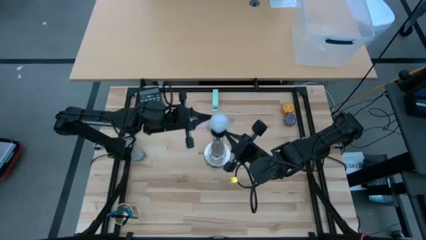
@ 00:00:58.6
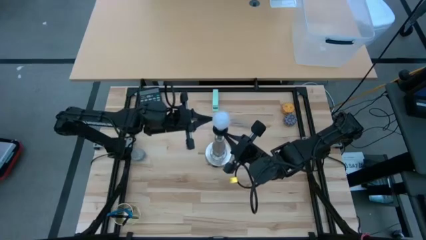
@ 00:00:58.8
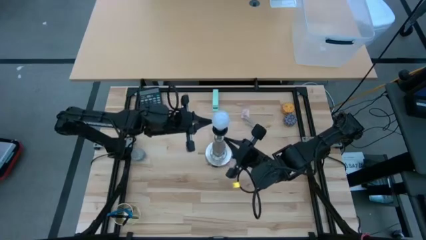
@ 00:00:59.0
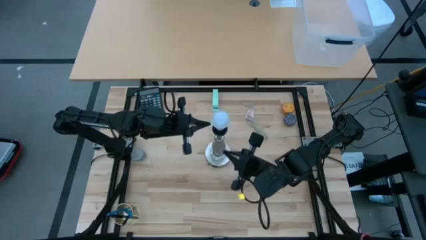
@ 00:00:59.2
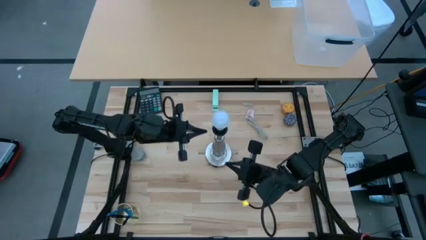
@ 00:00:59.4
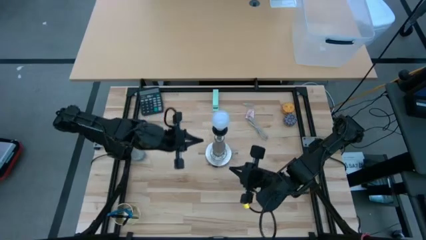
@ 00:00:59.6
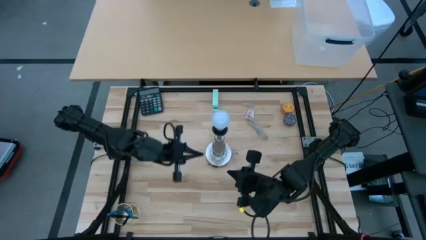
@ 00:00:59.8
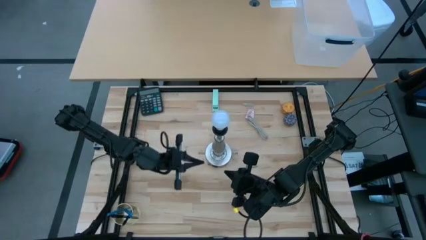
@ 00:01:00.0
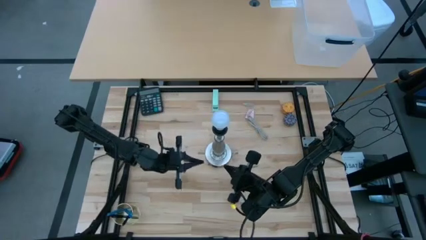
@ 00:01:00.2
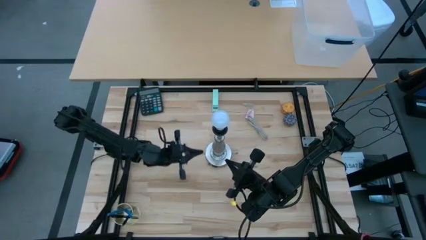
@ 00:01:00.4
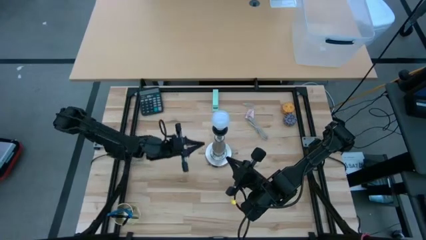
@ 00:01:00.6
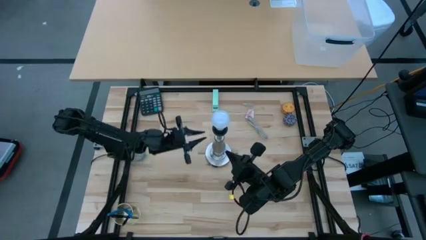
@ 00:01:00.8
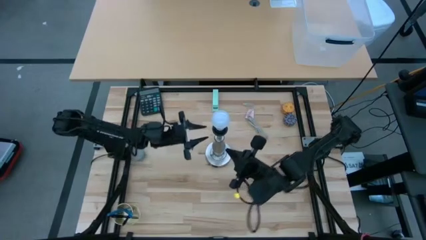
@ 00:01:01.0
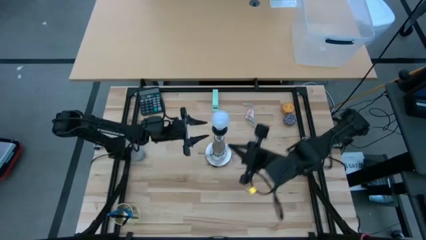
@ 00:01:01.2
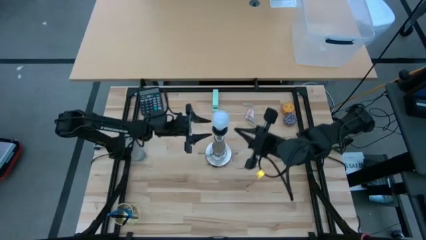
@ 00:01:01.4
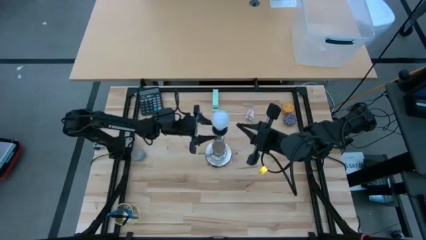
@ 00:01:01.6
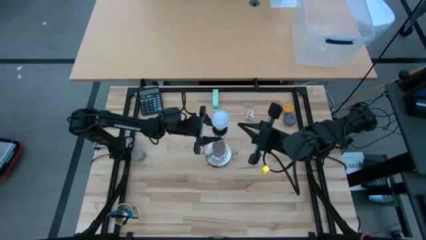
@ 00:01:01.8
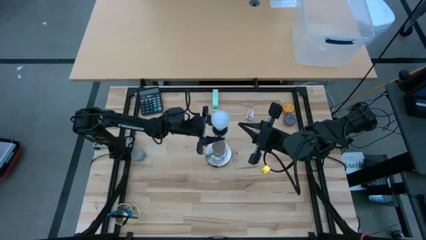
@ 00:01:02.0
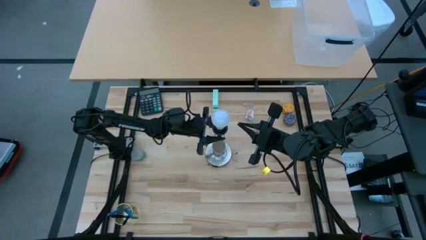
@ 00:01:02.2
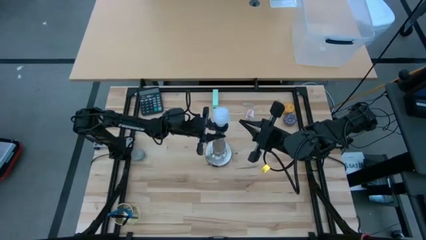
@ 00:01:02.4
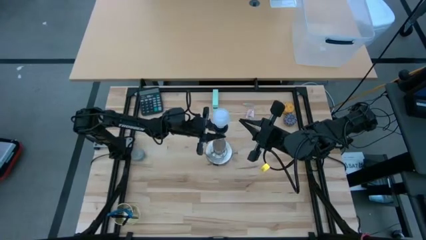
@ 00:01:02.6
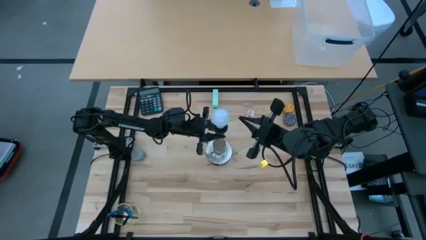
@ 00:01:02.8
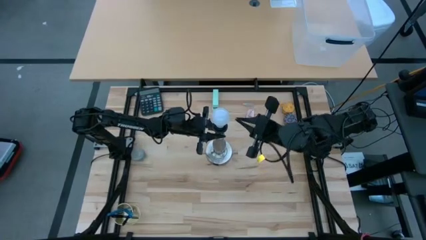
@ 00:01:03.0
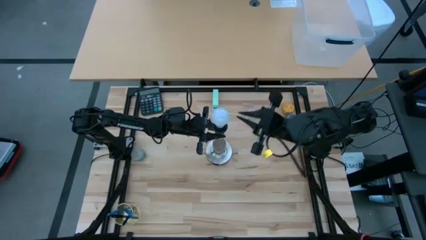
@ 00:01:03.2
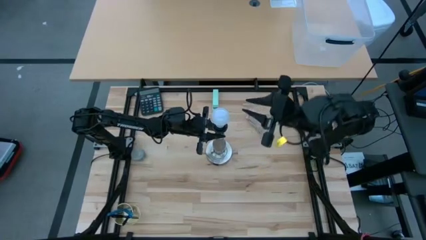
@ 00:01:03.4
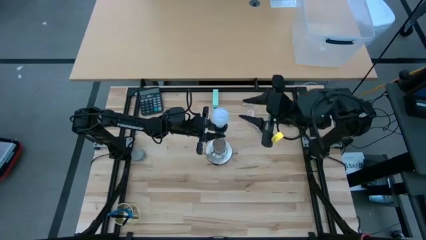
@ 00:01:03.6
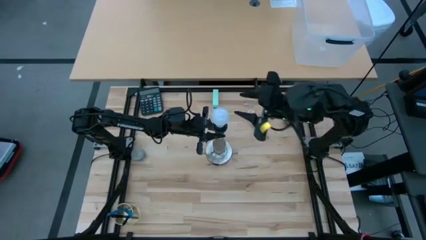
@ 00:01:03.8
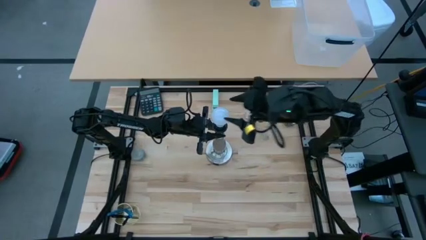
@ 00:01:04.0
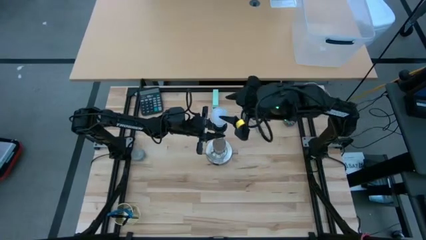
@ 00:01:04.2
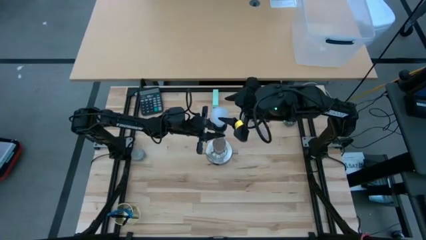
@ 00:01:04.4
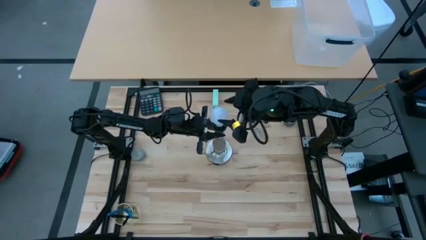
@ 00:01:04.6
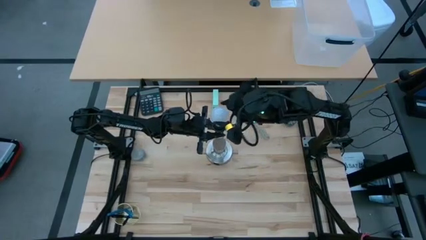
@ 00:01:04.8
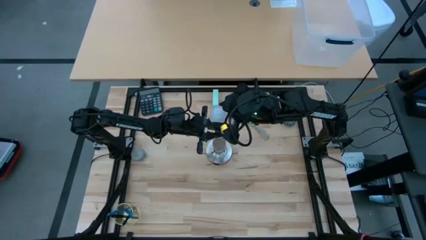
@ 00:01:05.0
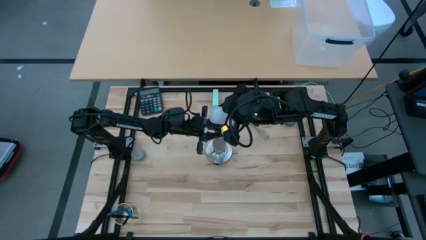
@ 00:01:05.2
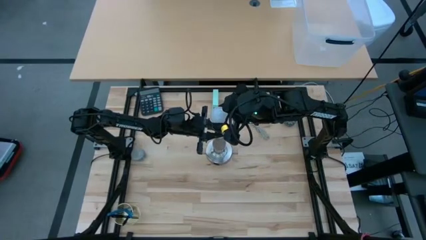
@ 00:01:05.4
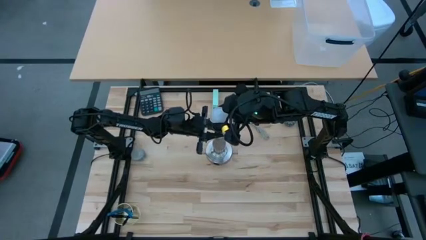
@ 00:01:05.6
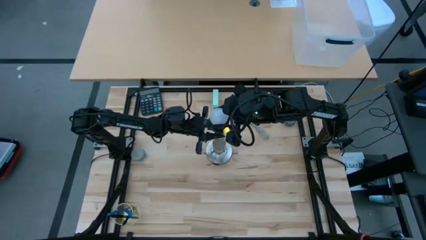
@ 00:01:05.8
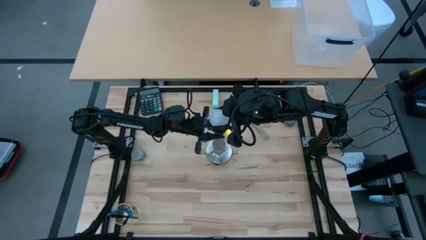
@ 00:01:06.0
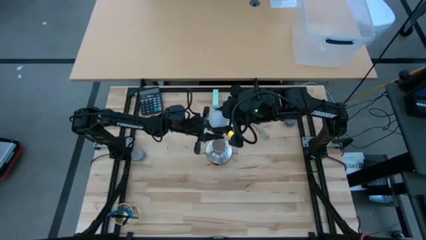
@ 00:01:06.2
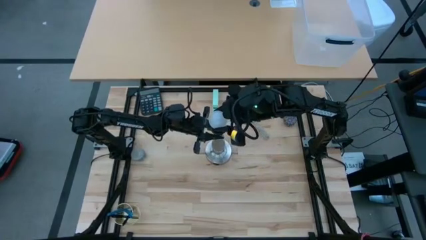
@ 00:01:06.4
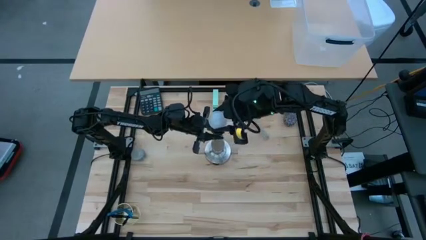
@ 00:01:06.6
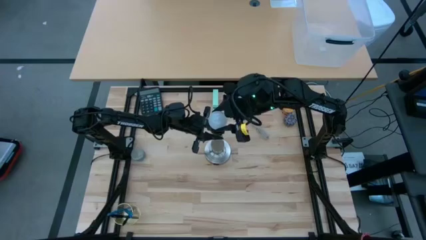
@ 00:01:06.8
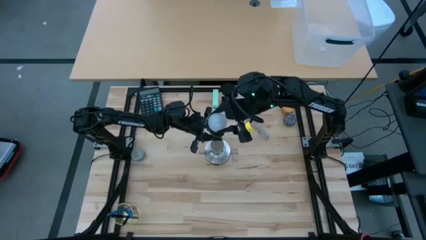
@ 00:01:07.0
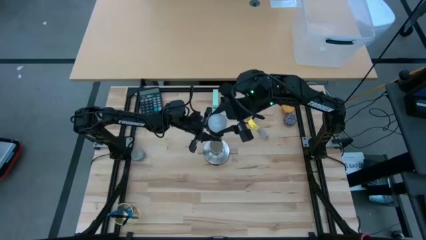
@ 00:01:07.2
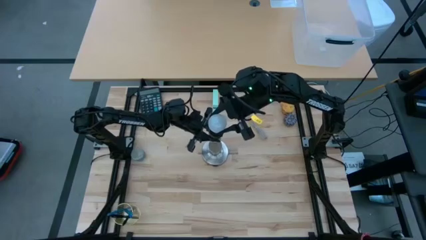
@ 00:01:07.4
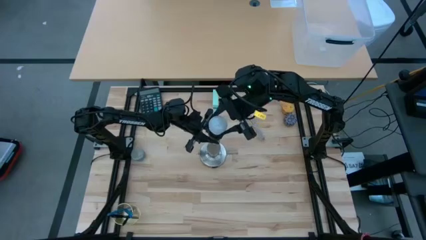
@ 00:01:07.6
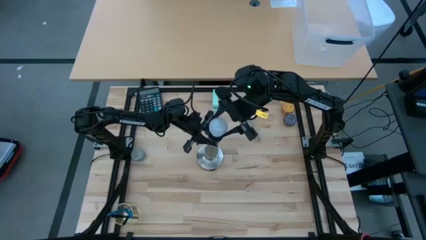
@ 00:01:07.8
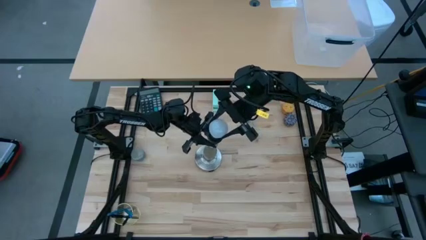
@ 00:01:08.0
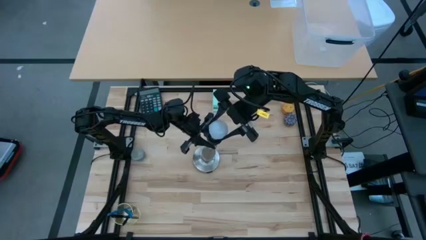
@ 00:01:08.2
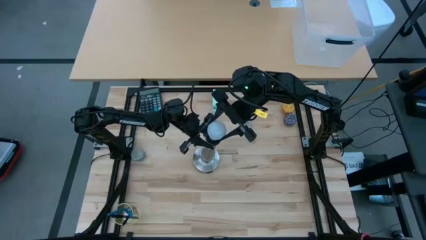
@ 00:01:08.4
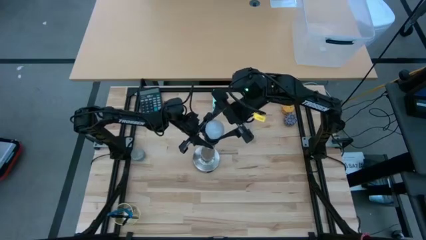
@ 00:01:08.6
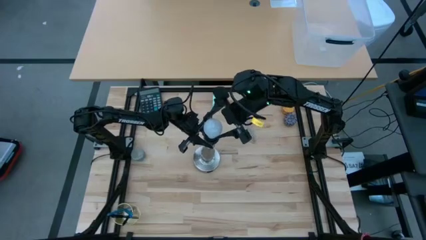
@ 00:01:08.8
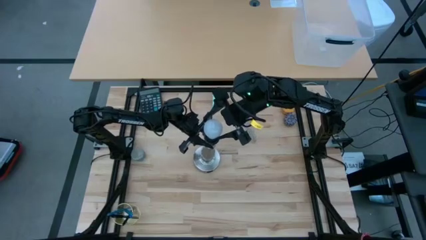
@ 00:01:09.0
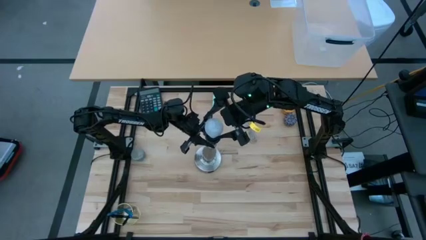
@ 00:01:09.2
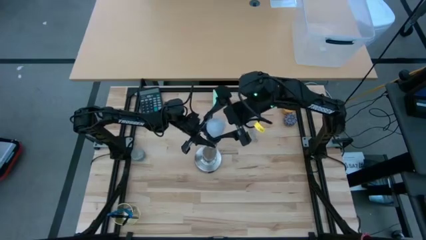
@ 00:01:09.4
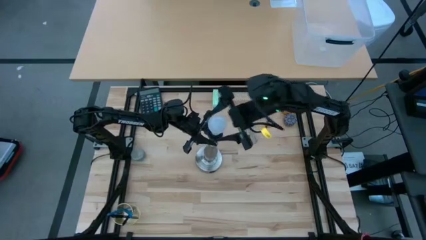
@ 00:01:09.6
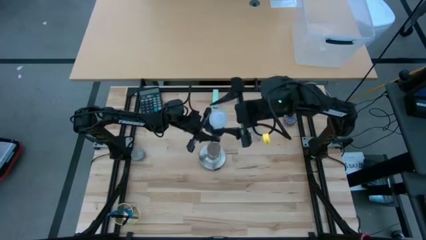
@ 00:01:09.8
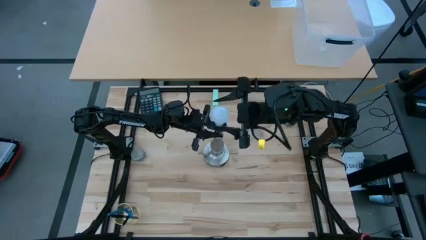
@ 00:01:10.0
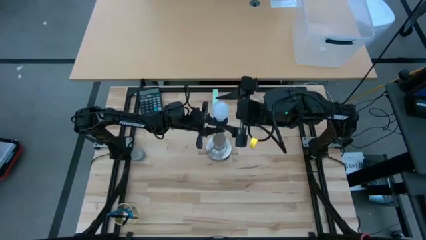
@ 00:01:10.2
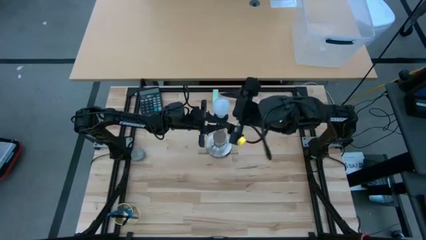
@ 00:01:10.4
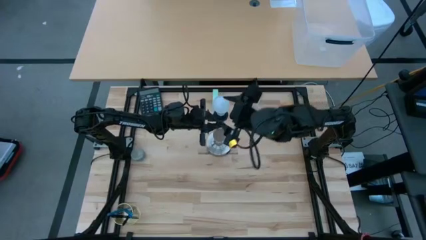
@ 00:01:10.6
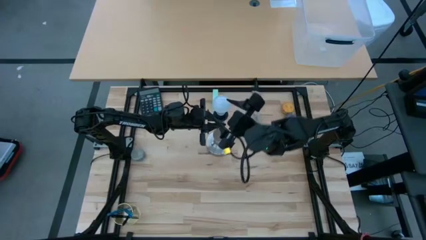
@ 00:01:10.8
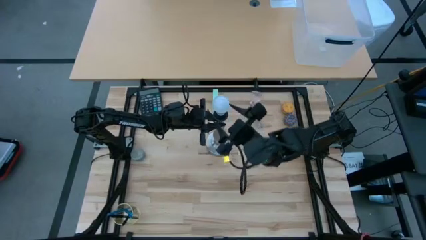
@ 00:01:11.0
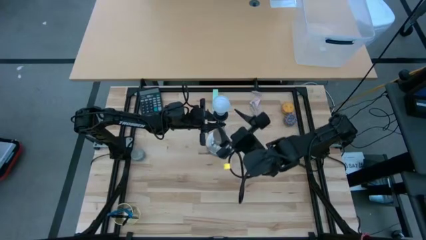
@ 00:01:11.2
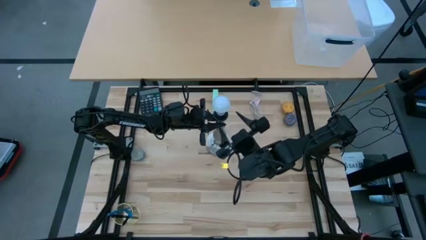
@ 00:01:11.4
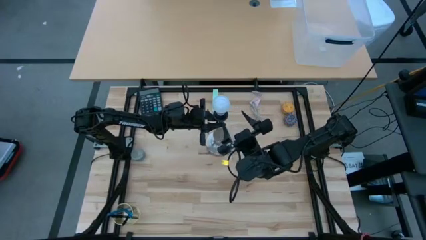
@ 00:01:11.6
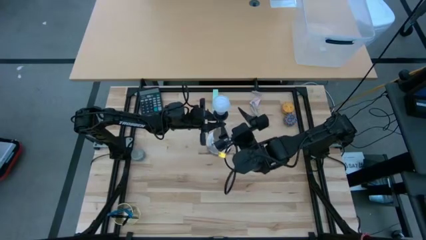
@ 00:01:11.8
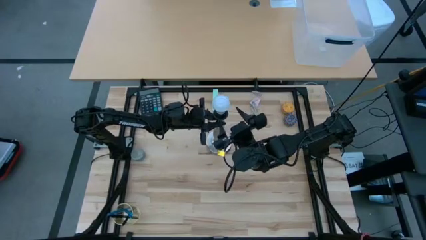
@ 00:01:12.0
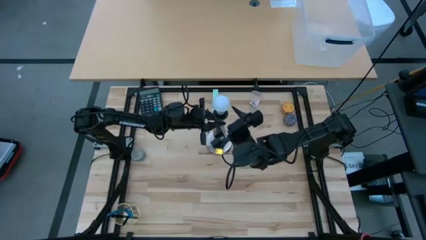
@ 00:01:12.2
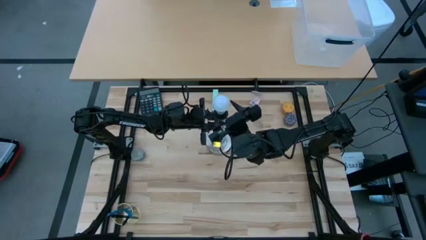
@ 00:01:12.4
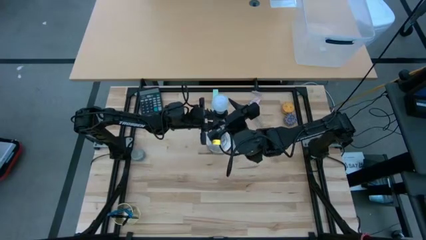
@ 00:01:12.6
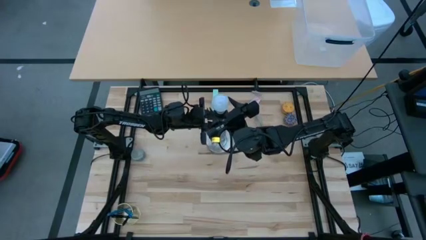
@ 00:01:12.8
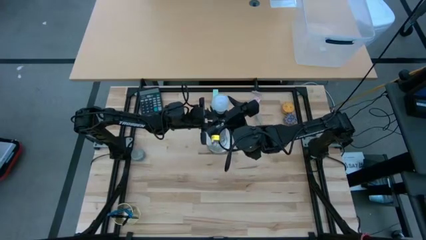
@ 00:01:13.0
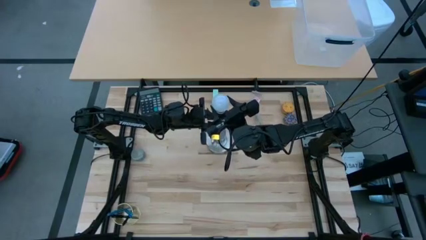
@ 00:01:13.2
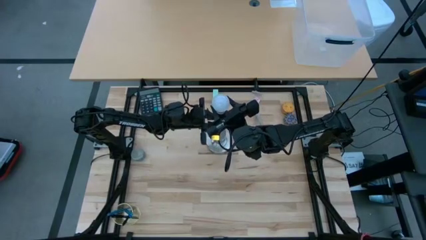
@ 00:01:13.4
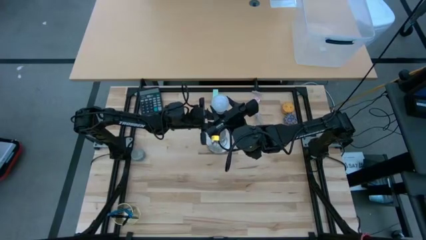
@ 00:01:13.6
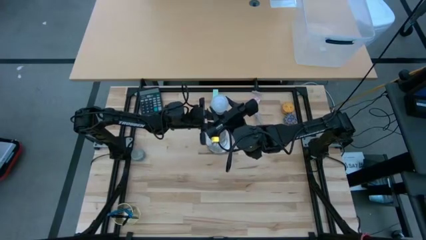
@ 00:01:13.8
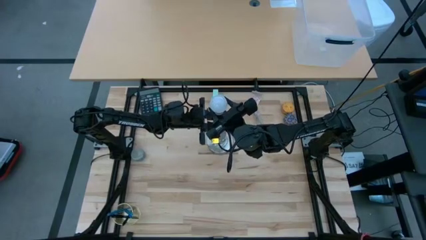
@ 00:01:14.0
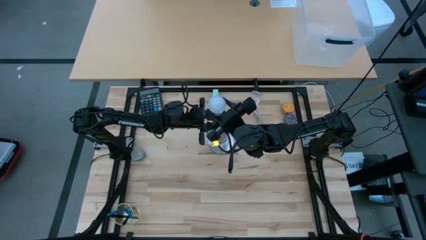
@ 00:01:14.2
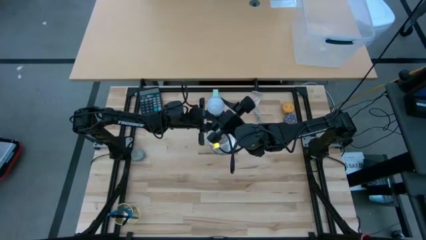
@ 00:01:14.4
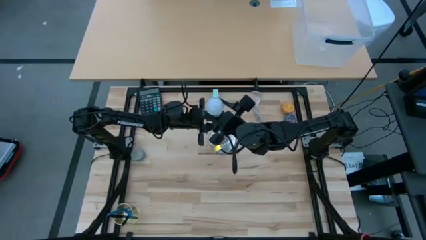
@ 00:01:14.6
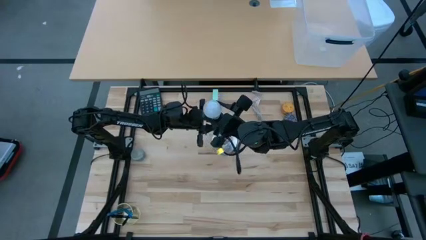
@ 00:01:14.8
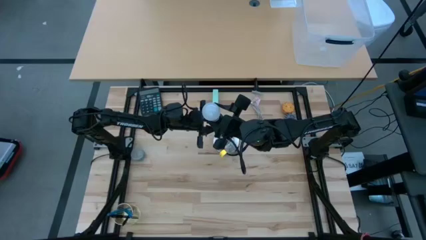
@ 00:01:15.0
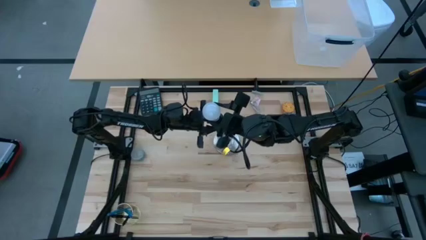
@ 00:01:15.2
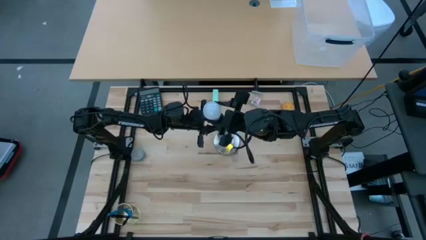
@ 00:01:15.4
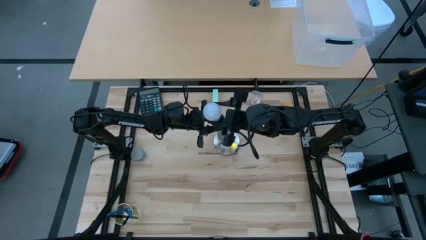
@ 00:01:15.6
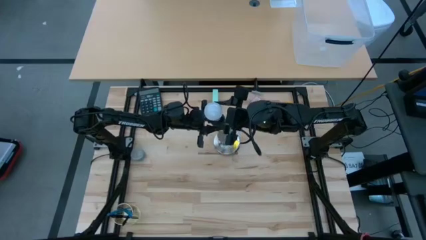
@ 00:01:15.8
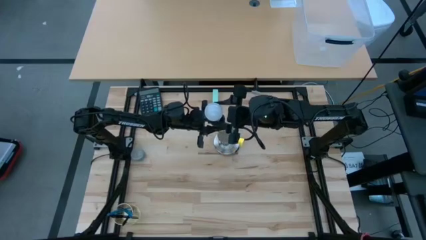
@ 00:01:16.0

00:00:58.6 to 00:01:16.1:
Task: Screw lightbulb
Remove the white lightbulb from the desk lamp
